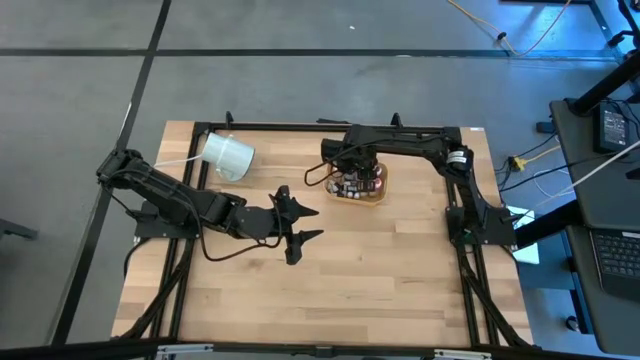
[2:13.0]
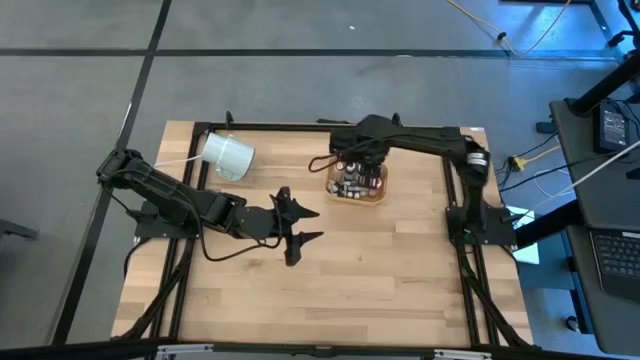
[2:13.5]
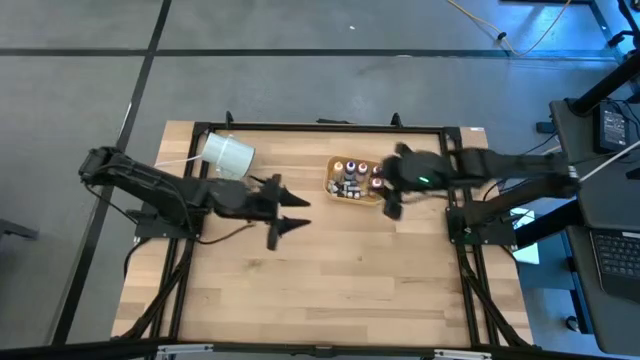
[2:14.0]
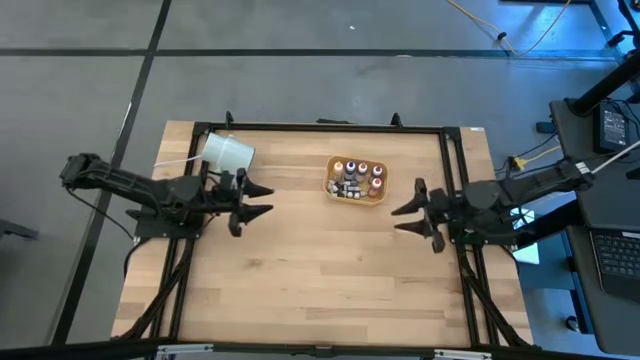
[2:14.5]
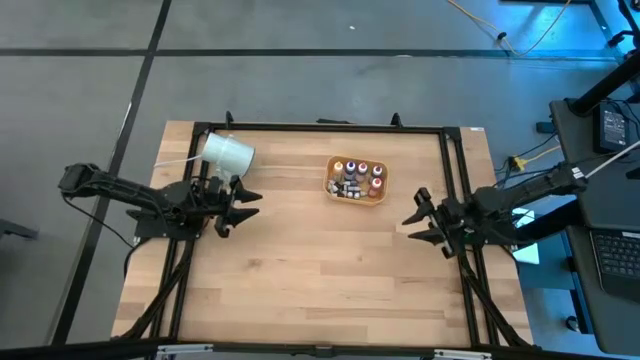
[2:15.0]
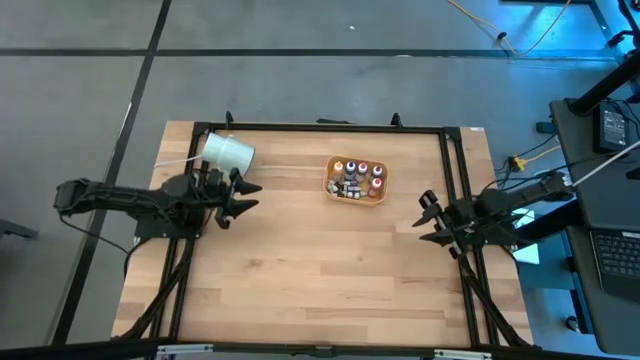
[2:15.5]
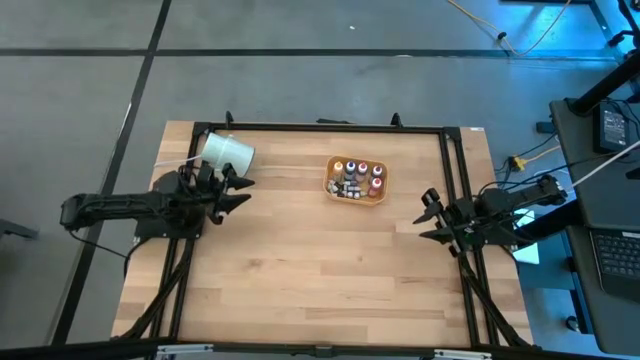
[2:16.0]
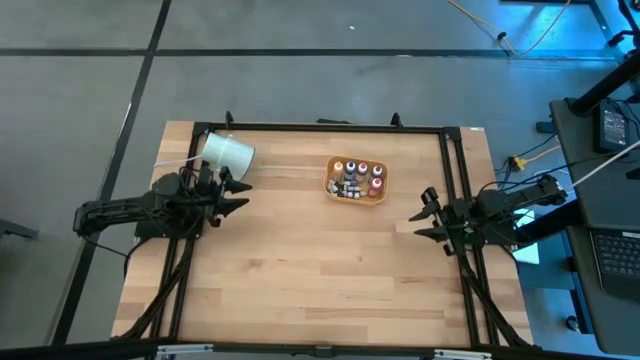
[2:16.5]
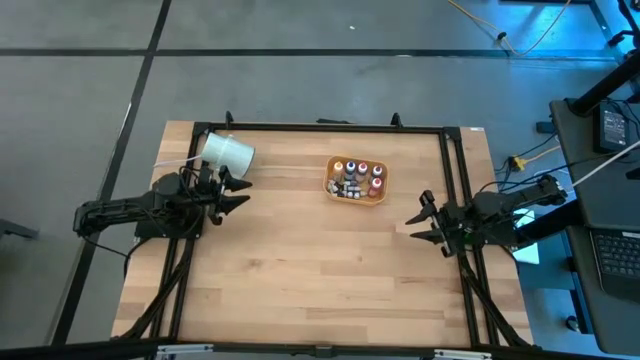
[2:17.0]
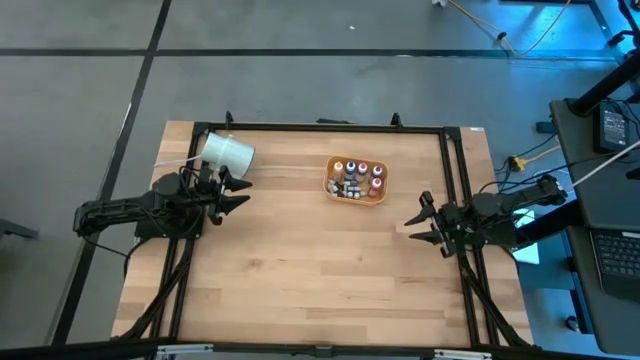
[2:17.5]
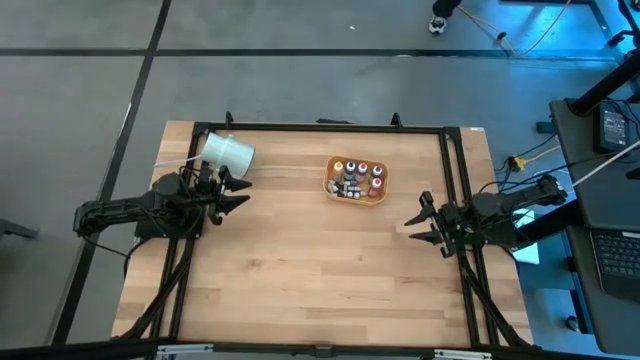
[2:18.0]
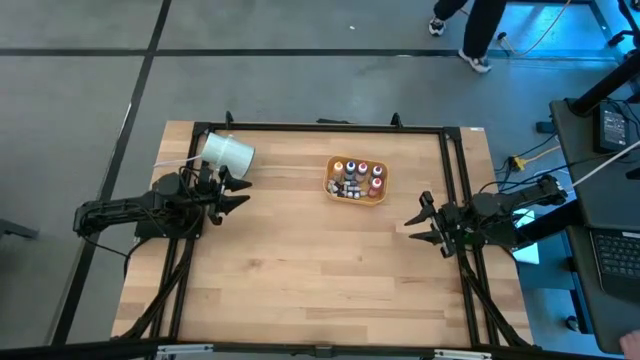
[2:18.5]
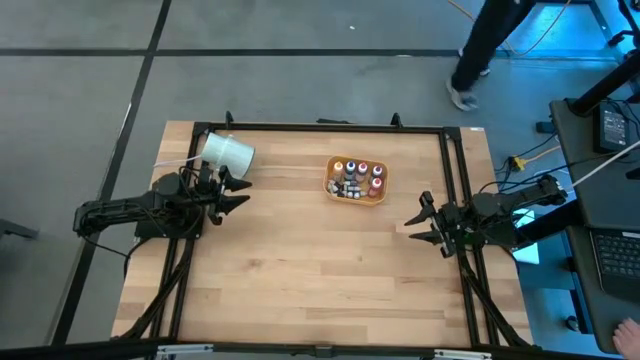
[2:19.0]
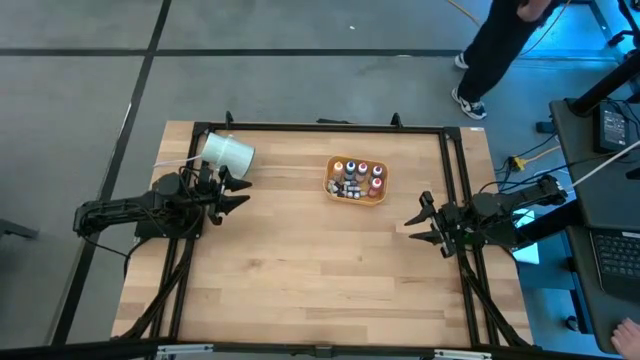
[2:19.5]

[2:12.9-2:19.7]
Task: Pick & Place food coloring
Return to Home Position

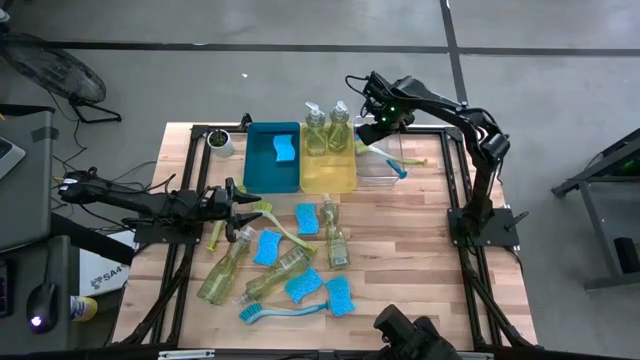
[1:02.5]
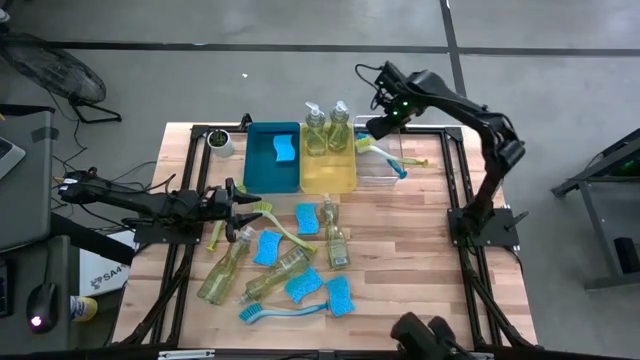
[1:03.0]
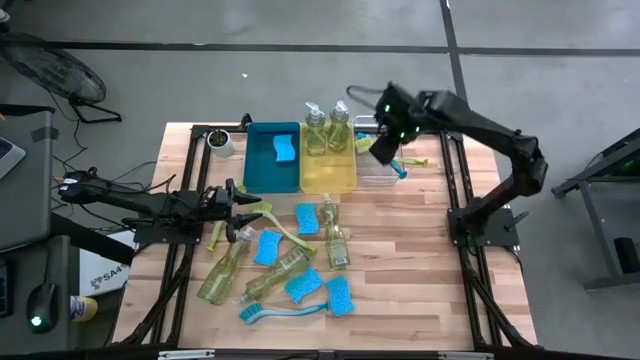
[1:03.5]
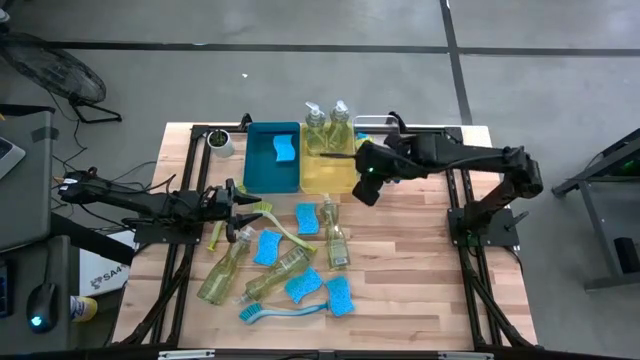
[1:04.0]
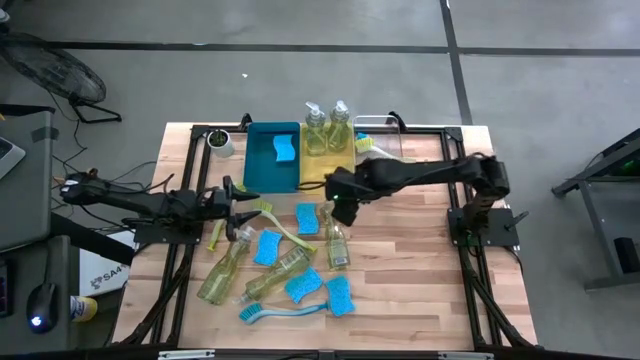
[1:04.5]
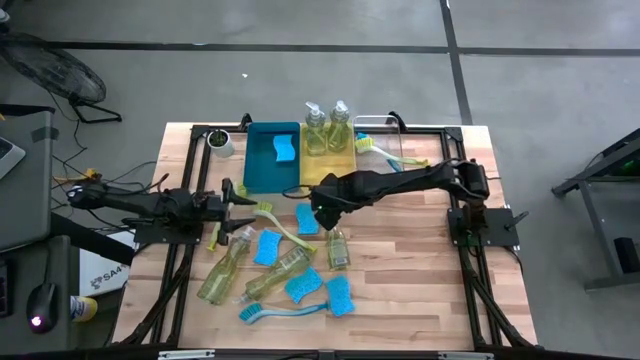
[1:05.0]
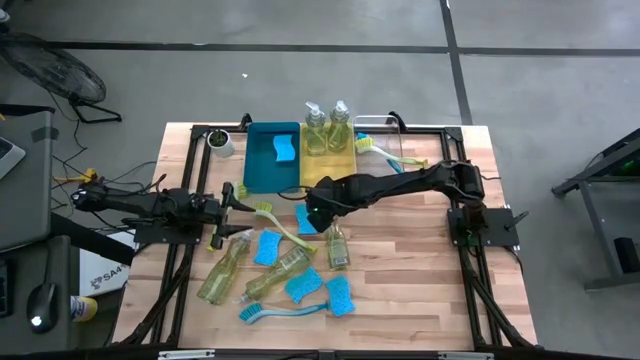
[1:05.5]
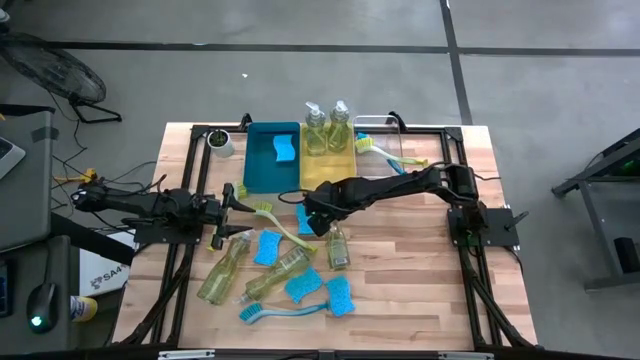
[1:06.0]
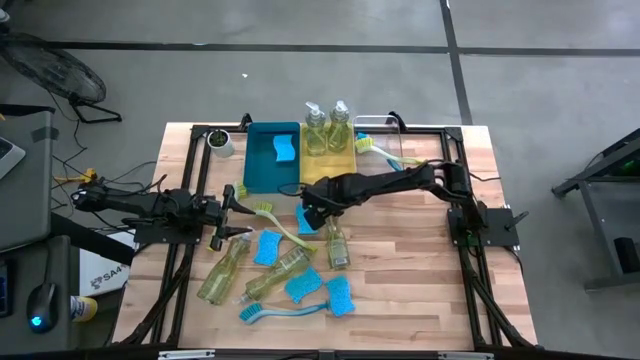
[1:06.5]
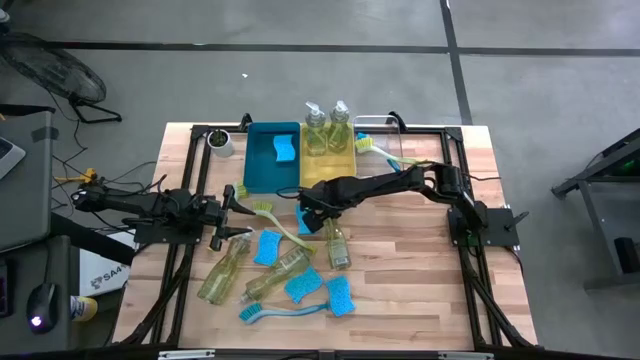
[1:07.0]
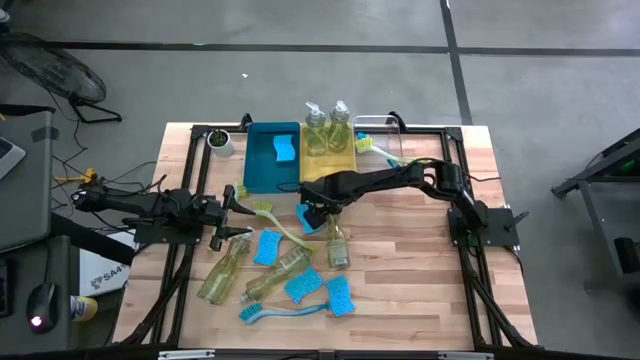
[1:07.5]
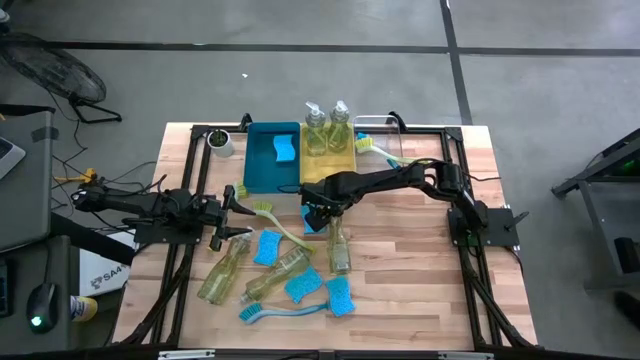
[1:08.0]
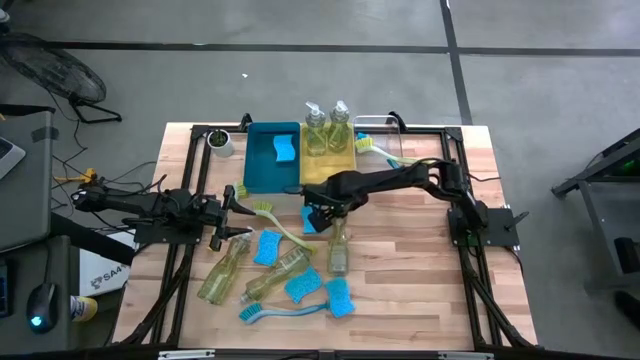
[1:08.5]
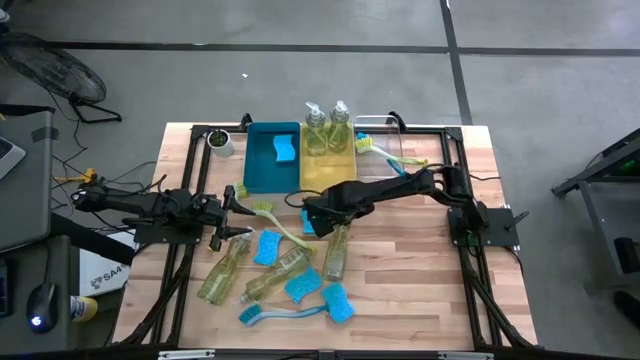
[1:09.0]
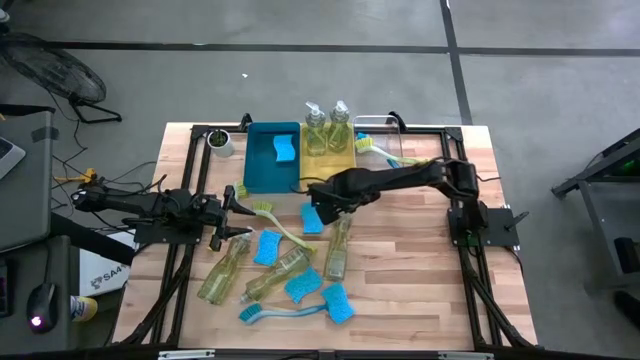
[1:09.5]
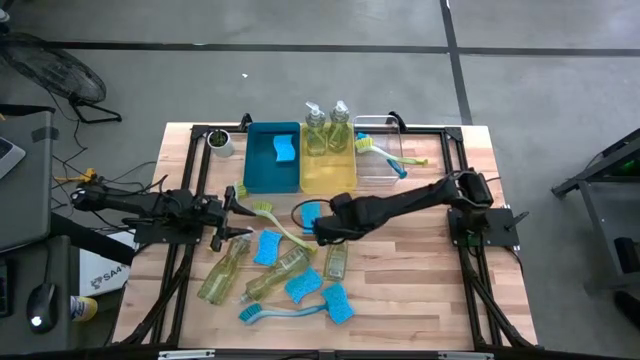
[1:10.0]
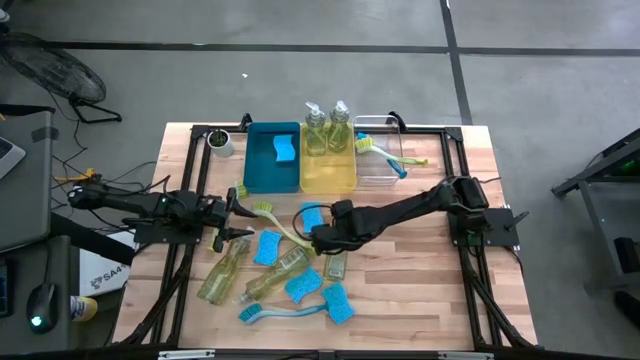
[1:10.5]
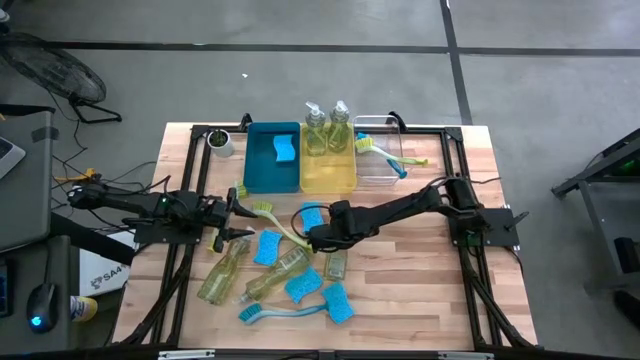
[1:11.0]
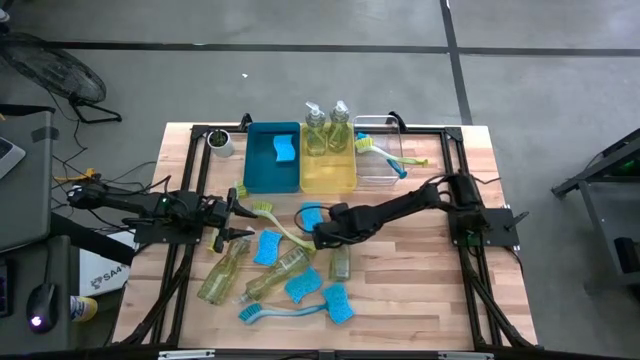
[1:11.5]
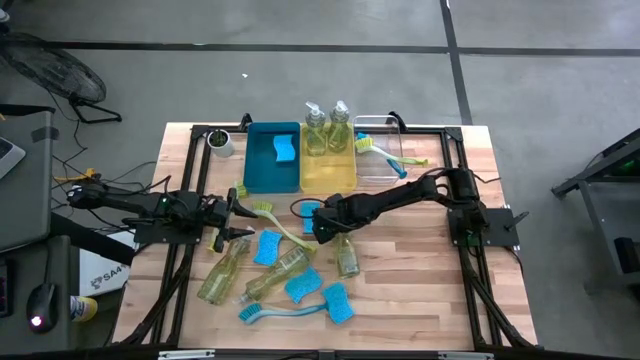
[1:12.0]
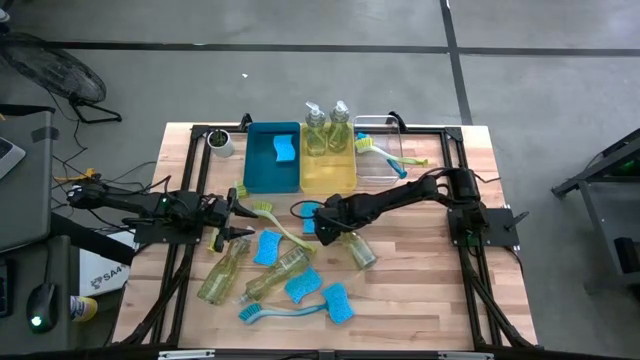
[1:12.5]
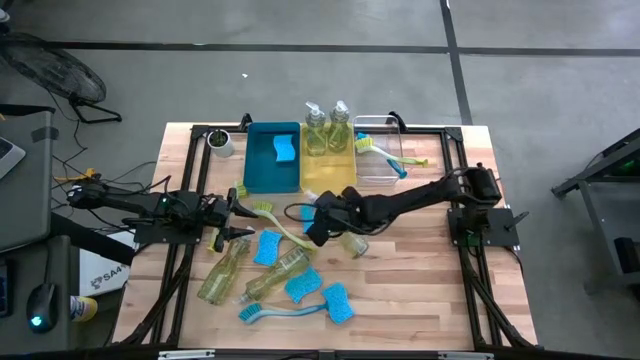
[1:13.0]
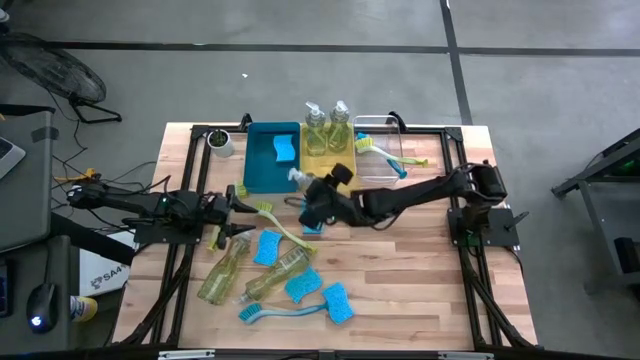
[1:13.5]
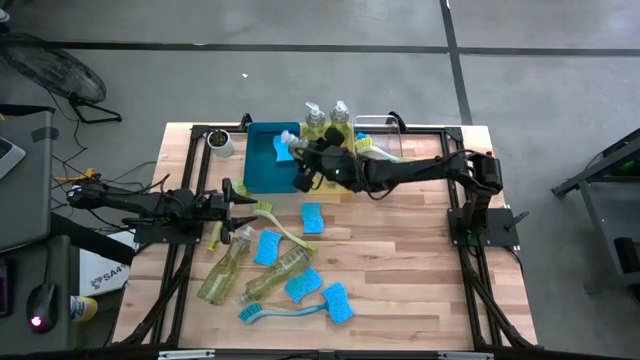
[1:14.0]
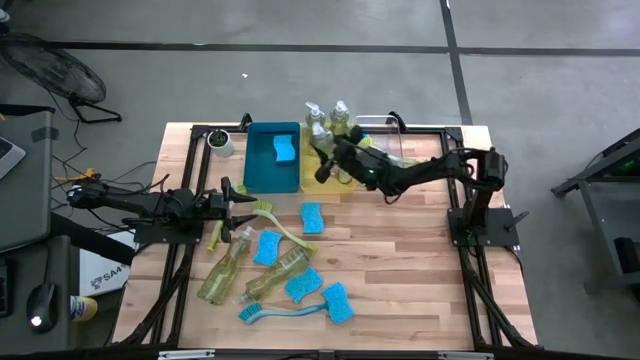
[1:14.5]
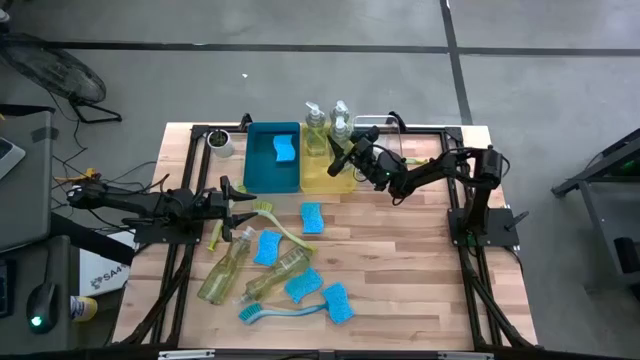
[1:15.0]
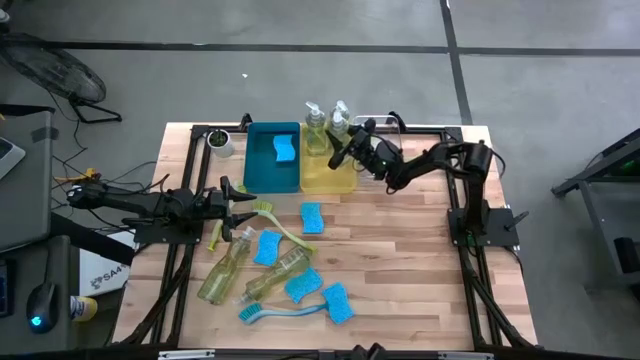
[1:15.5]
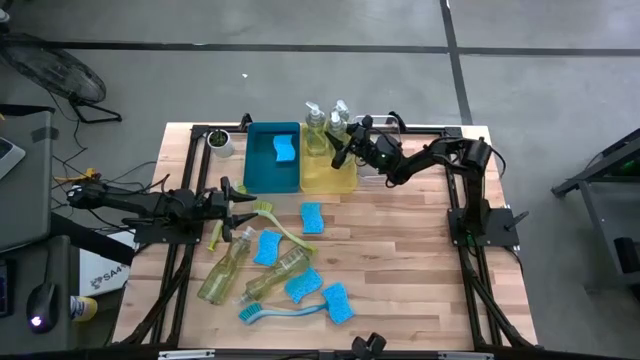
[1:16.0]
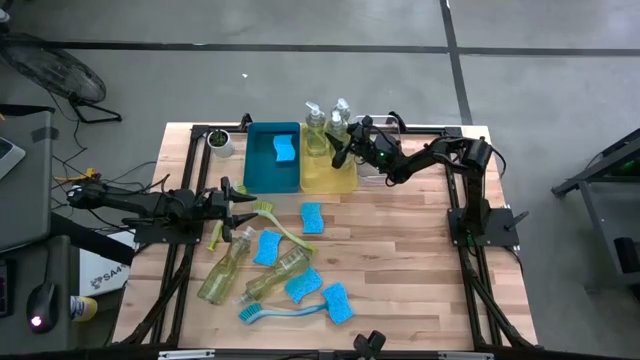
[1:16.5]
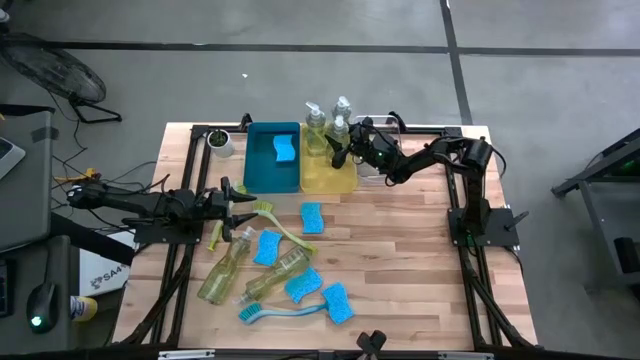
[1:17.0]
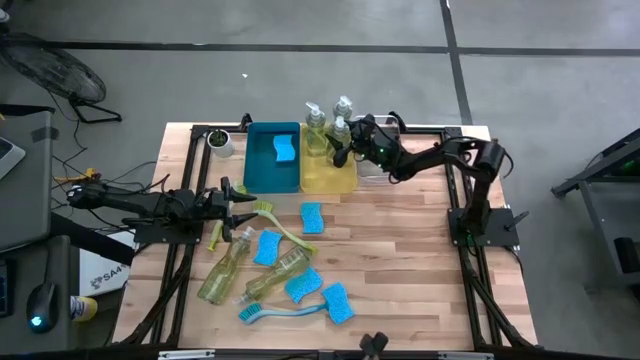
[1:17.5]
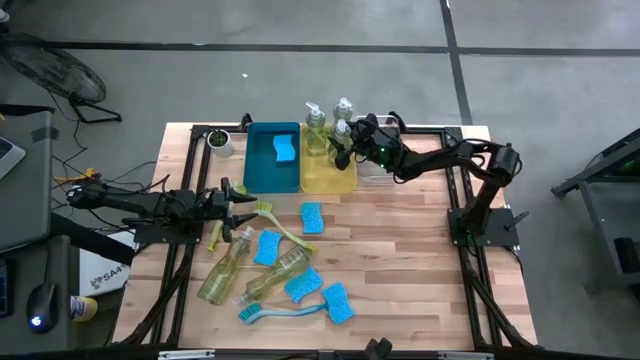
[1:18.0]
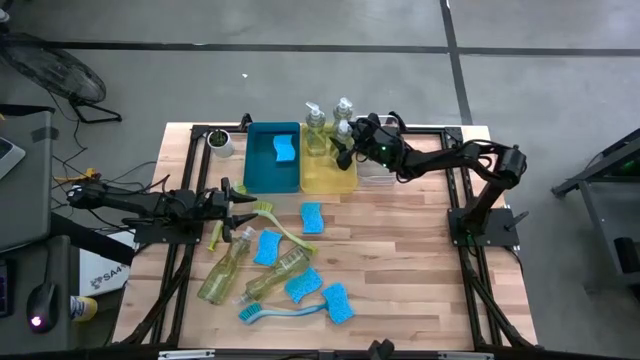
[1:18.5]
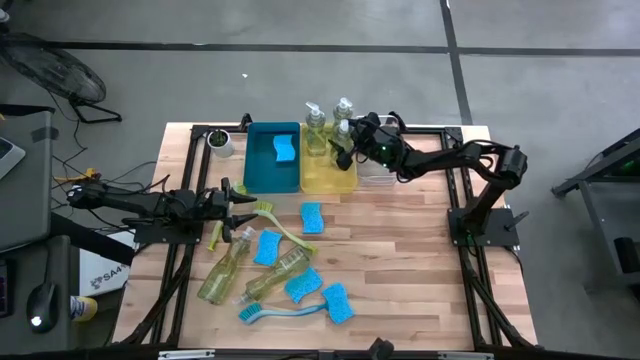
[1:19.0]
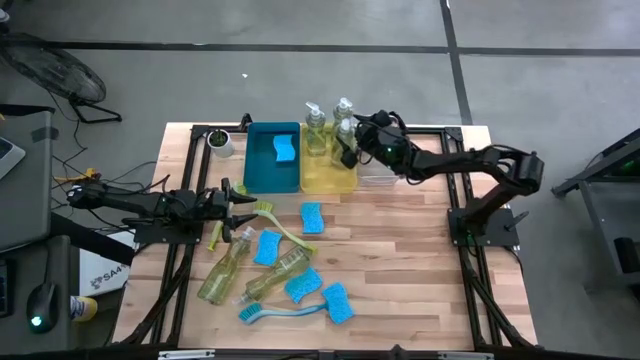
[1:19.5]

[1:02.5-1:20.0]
Task: Pick & Place Kitchen Sink Supplies
Put the dishwashing liquid into the yellow bin
